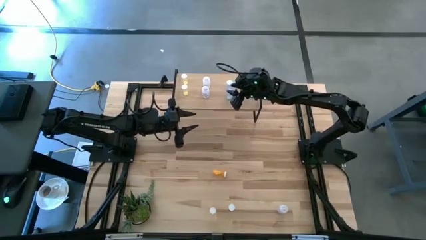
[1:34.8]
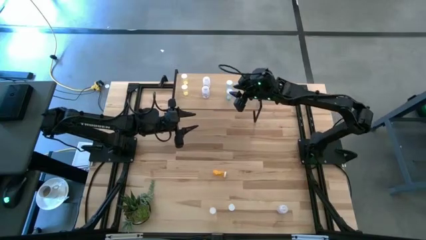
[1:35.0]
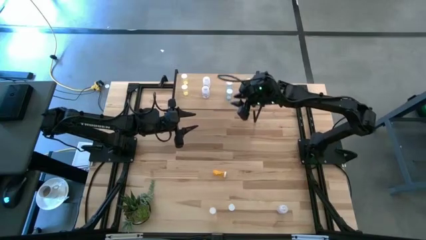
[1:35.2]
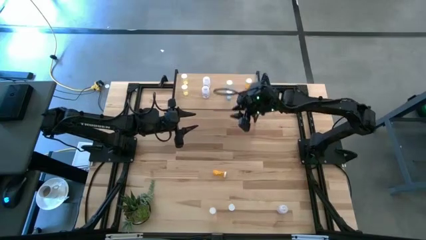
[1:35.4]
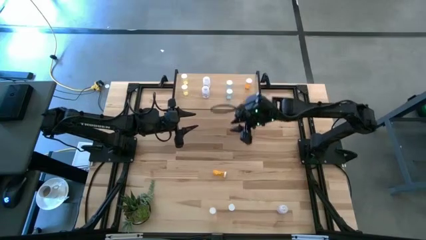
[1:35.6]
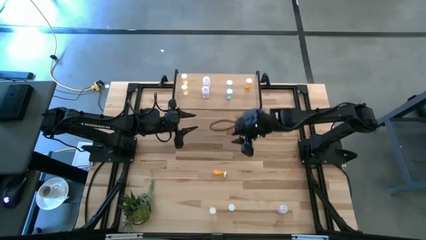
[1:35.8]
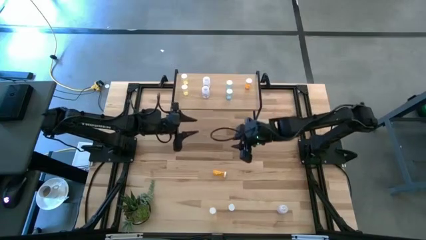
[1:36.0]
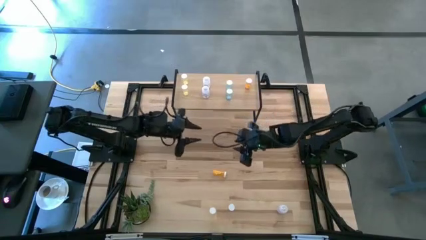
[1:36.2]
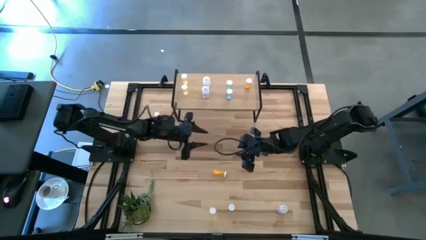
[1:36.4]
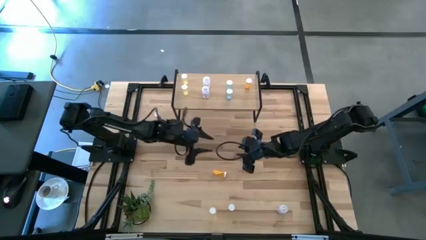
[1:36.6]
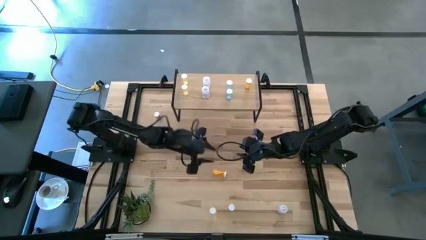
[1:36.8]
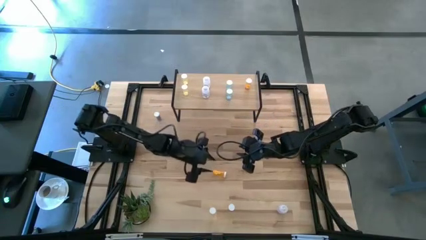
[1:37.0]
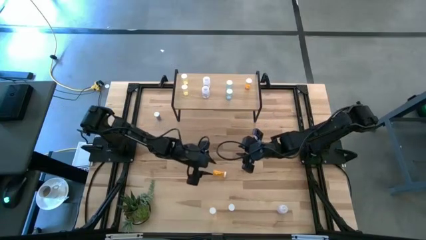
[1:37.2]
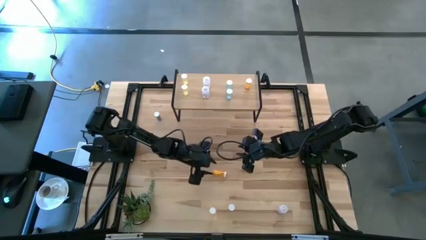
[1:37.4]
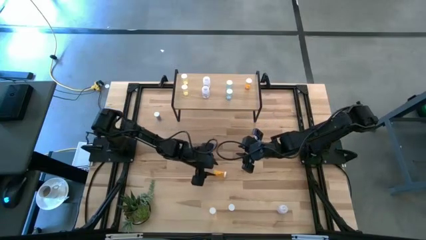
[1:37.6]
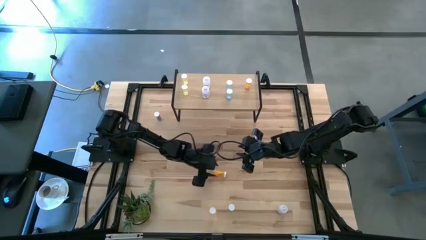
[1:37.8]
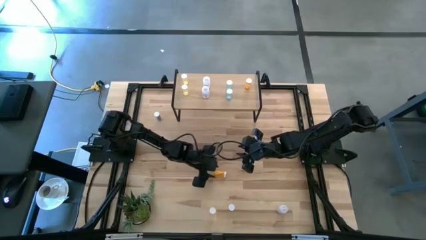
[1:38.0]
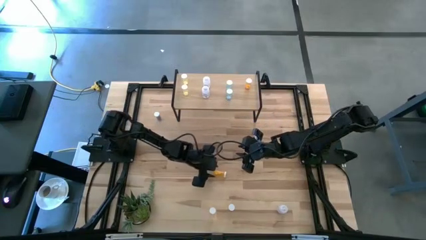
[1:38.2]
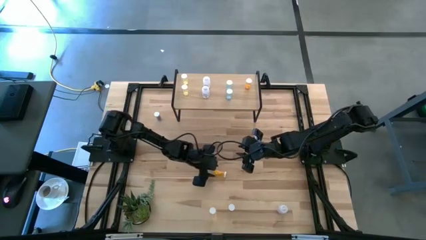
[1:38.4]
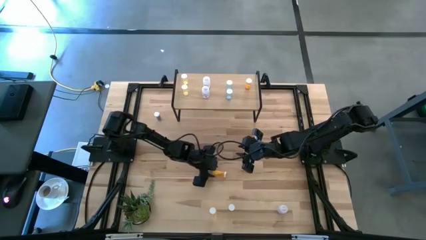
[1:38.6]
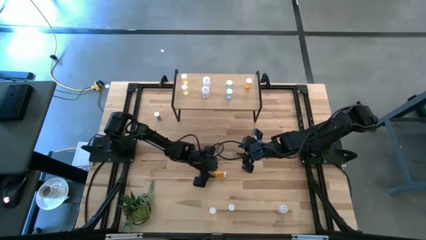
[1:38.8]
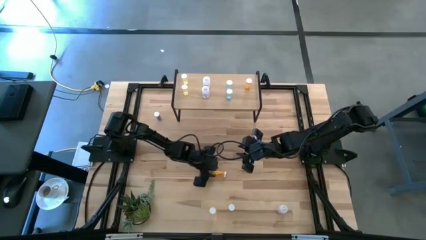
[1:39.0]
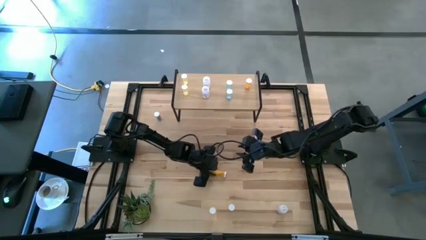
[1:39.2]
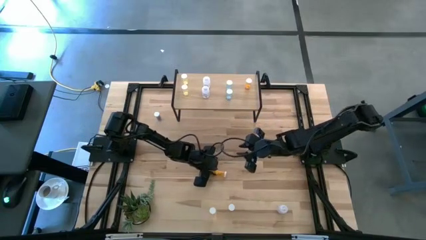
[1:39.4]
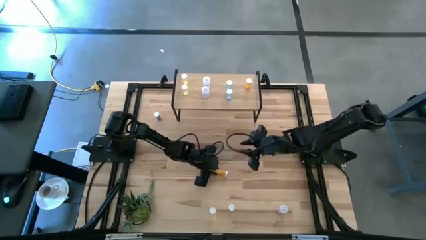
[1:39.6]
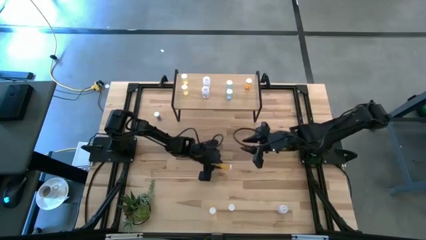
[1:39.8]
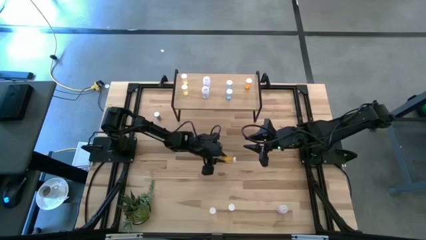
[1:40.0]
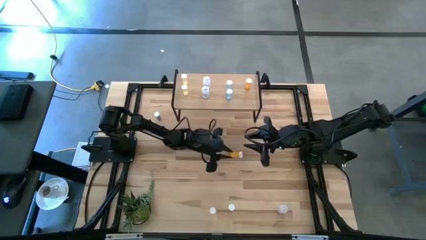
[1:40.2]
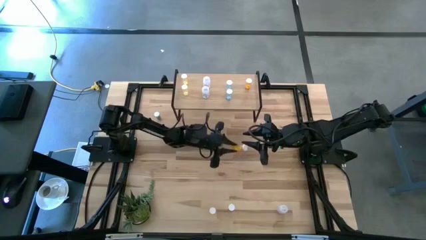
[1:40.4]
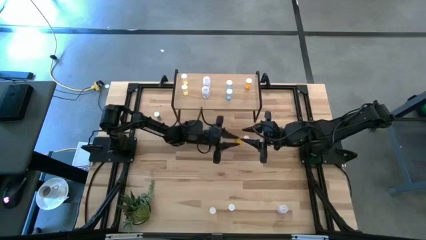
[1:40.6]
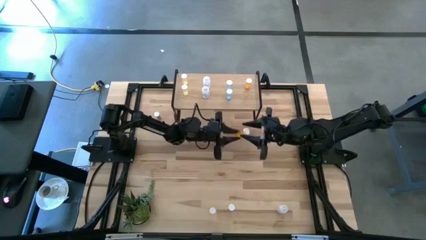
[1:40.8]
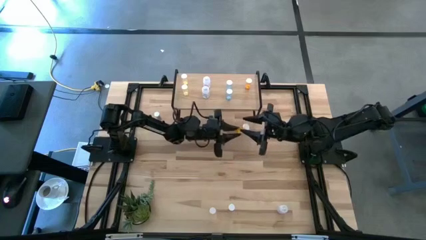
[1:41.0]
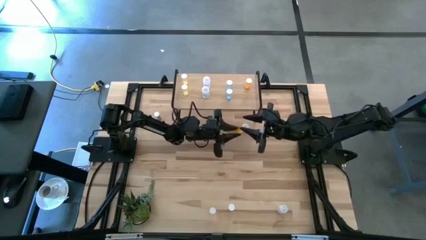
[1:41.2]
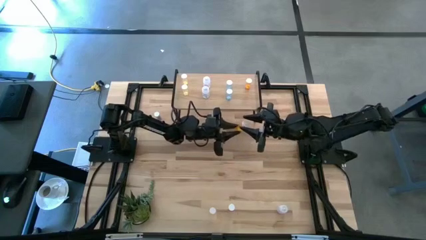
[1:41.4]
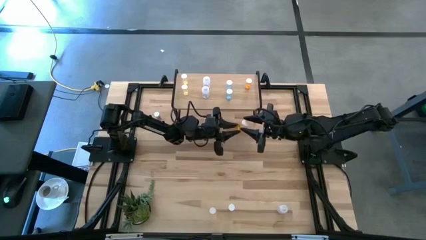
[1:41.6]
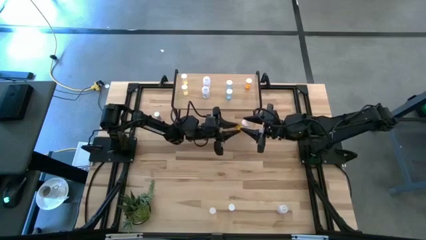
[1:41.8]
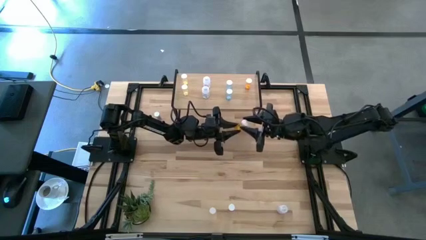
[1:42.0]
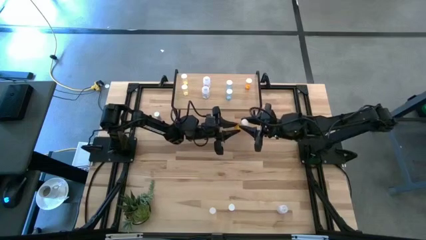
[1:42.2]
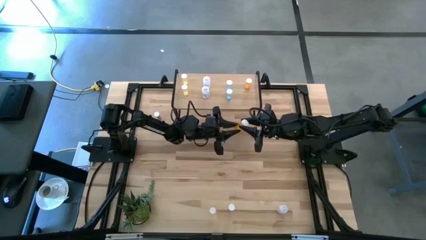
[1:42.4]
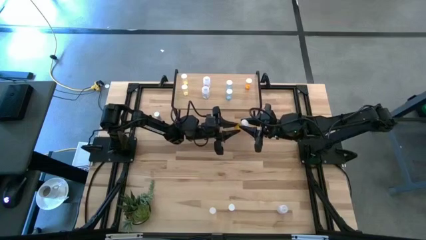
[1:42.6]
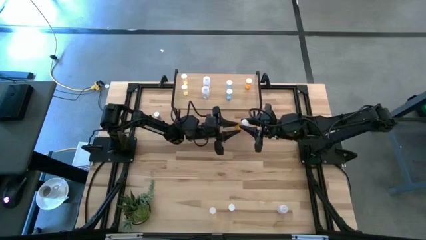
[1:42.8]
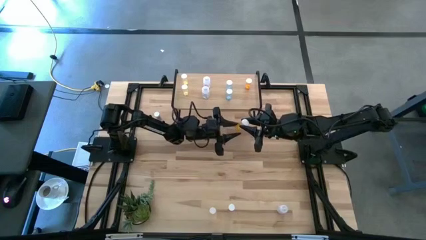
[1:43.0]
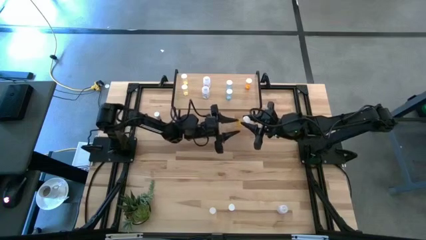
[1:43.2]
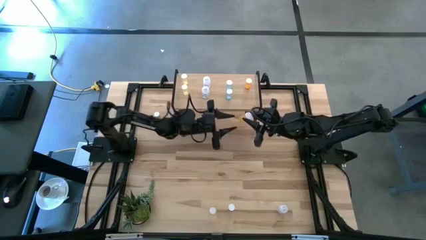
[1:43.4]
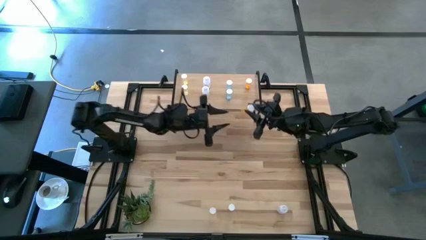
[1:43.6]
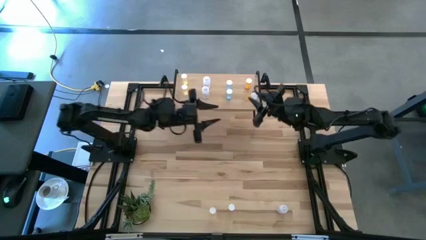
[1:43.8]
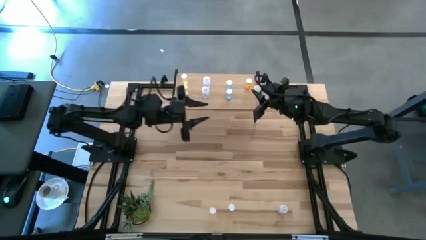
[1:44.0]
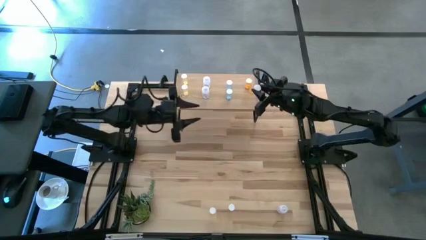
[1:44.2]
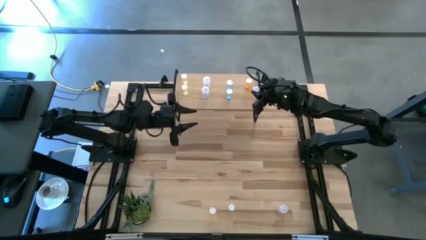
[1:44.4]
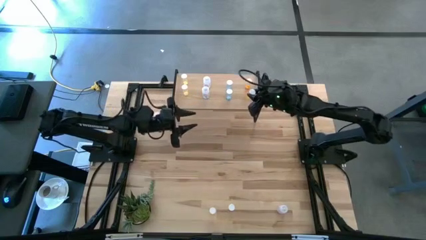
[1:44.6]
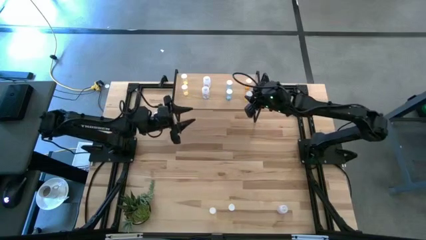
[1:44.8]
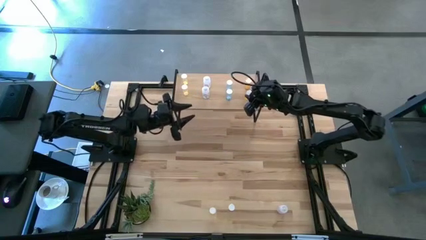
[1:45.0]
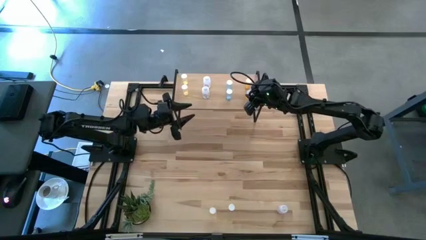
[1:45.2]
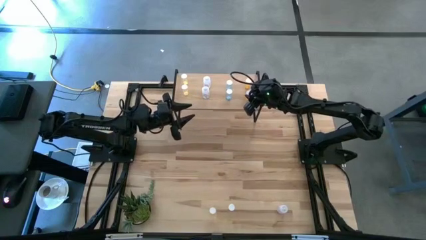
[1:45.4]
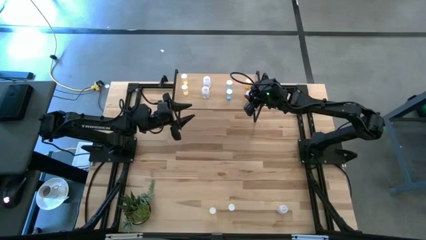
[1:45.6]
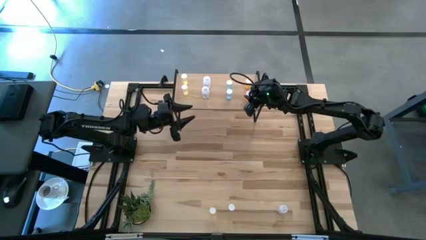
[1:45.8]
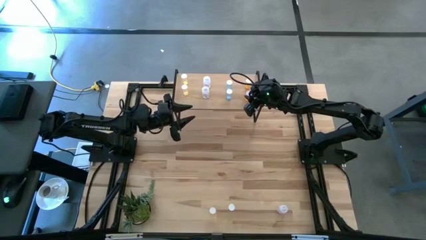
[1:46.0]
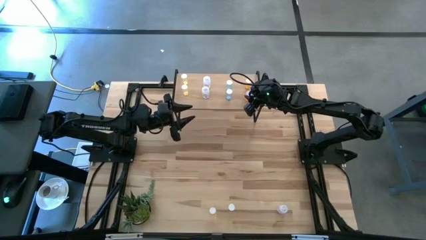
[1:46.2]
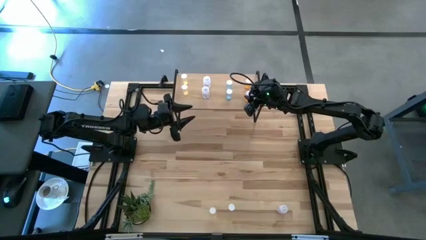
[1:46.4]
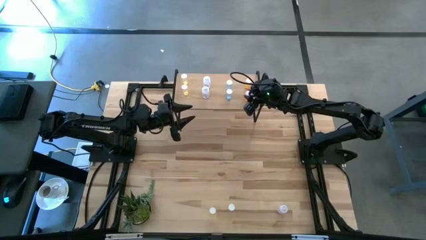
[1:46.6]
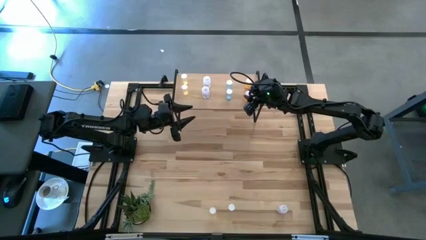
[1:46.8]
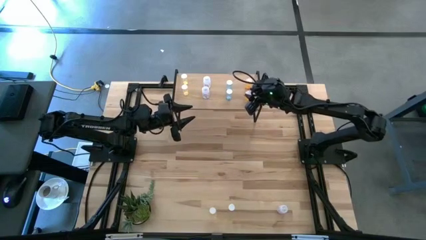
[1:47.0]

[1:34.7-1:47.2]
Task: Pick and place medicine bottles onto shelf by color
Put the top orange pill bottle on the shelf aligned with the orange pill bottle

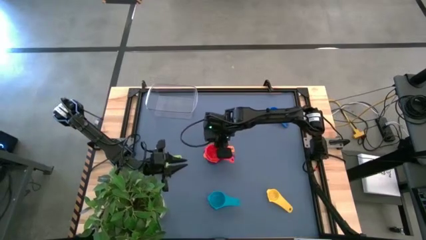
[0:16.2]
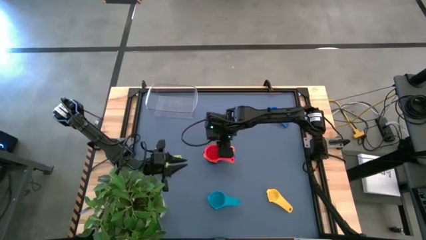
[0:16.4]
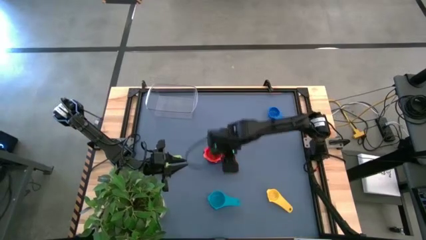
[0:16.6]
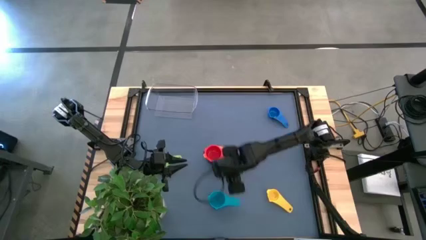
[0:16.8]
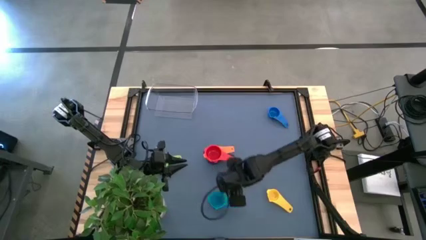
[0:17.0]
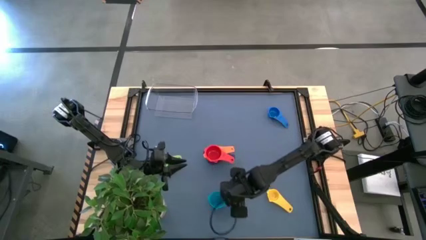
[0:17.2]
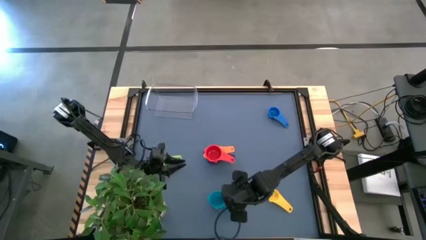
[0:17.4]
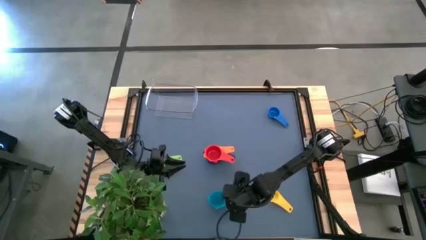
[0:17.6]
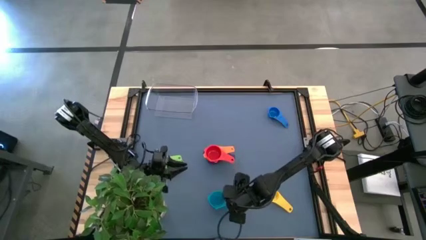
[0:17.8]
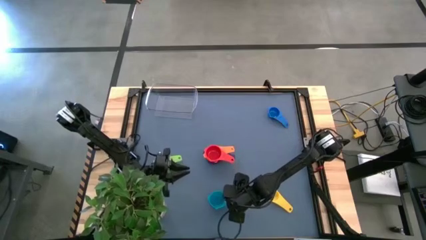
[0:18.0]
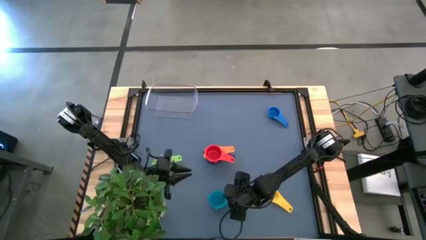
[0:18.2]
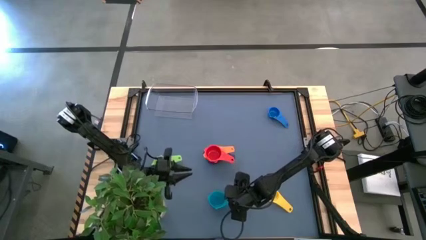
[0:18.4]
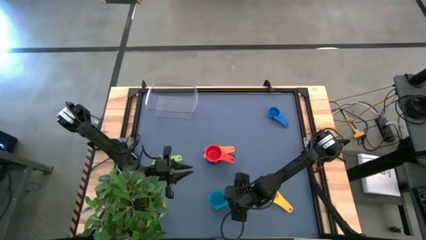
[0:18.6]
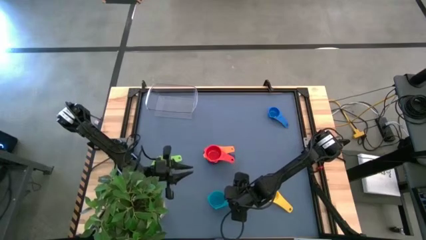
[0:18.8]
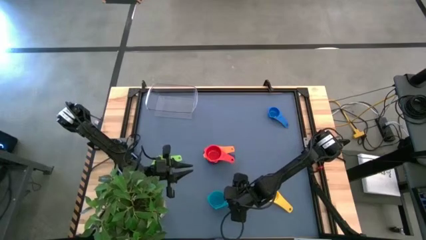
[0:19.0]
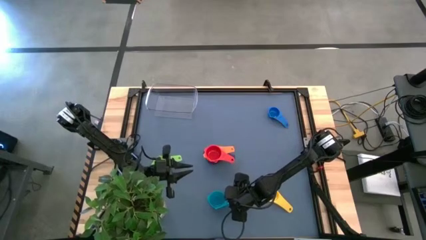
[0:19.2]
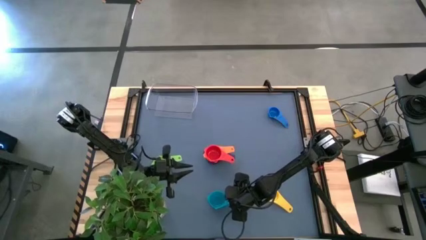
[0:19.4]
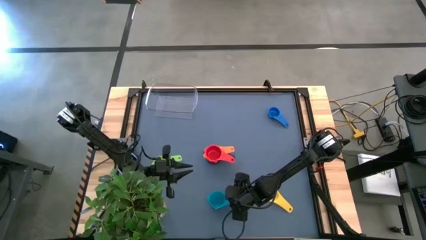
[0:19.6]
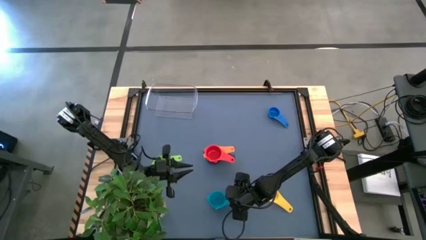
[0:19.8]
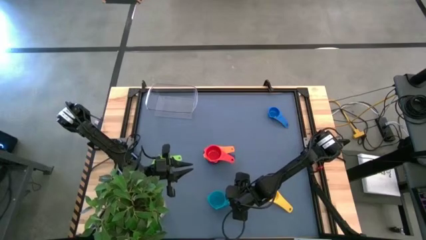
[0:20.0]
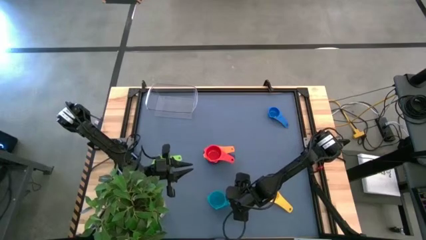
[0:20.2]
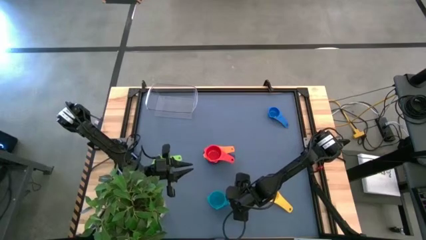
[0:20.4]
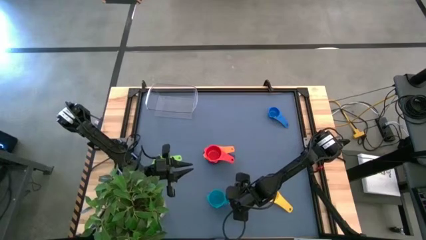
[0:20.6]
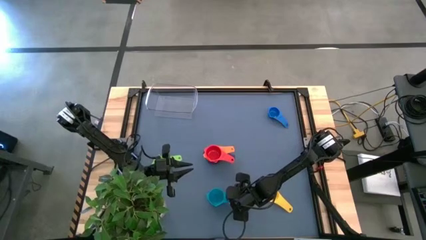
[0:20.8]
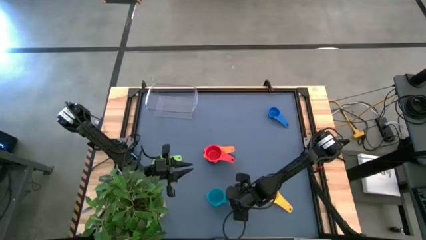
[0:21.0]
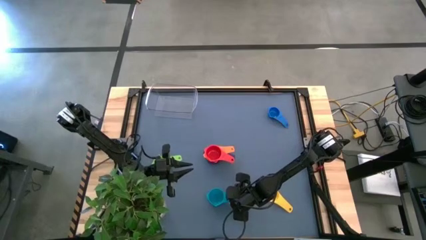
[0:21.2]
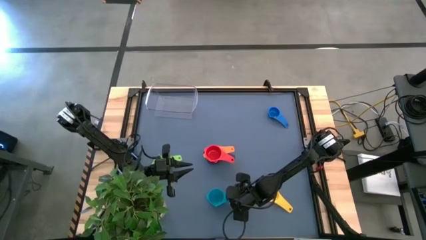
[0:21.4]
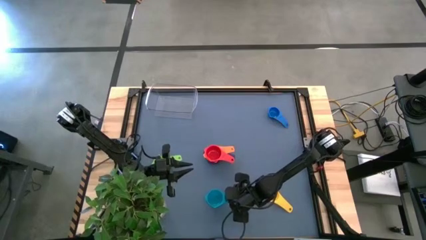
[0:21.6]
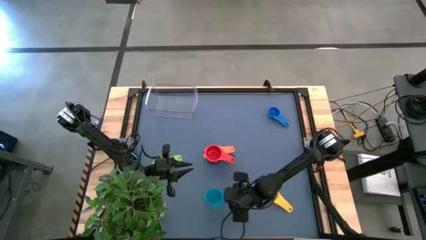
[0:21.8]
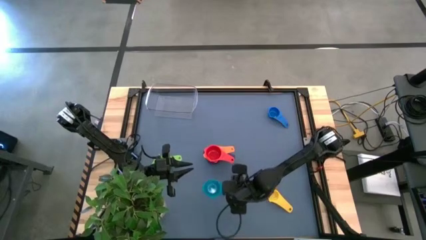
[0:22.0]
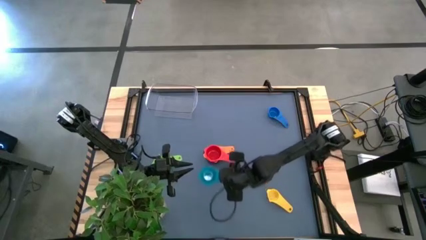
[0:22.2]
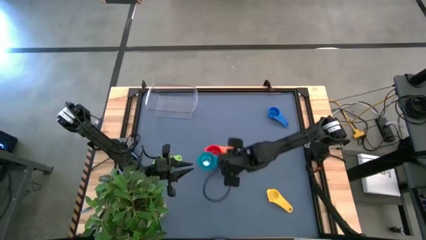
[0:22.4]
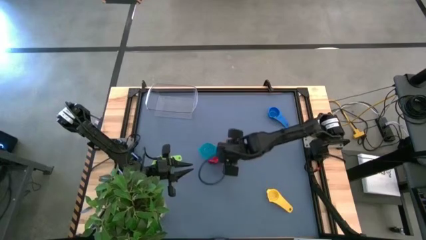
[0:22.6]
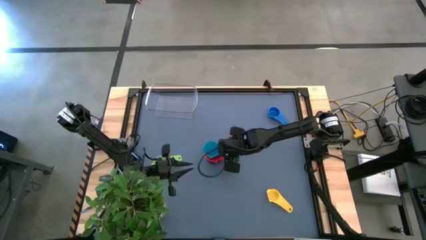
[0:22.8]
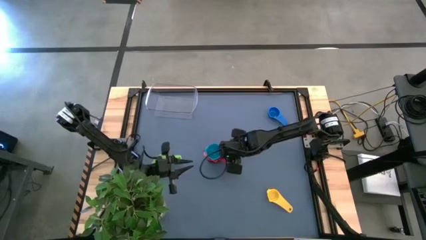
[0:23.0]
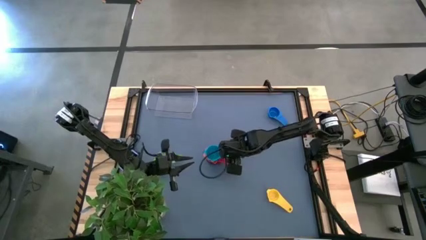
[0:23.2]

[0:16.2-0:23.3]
Task: Nest measuring cups in basket
Stack the light blue measuring cup on top of the red measuring cup
